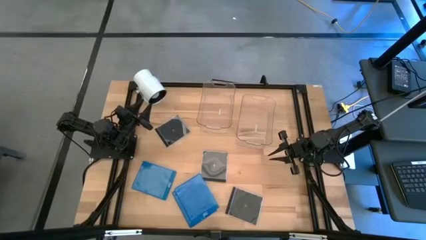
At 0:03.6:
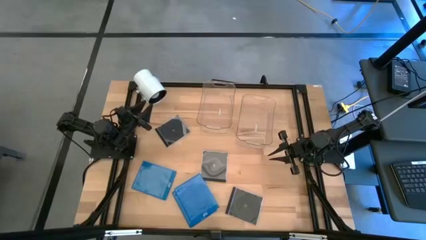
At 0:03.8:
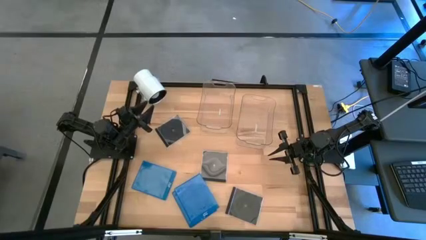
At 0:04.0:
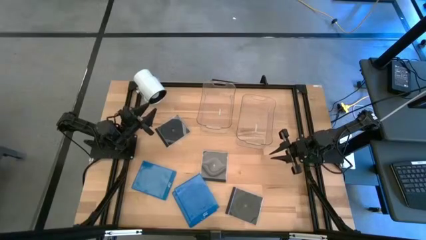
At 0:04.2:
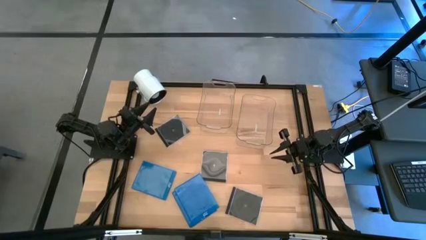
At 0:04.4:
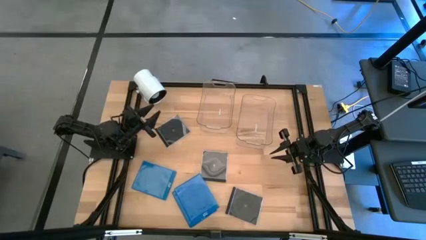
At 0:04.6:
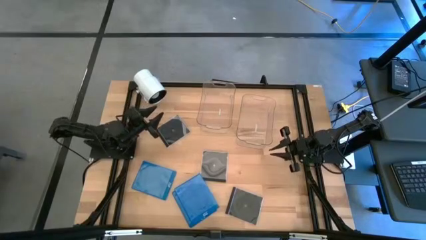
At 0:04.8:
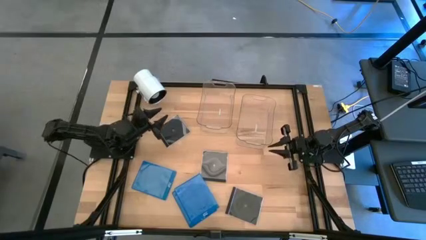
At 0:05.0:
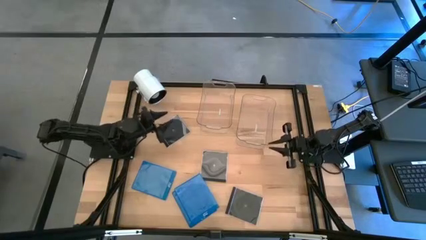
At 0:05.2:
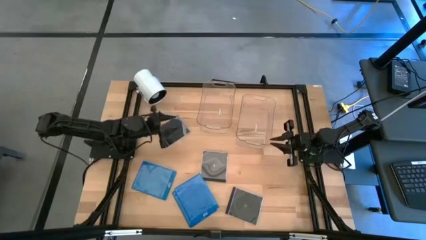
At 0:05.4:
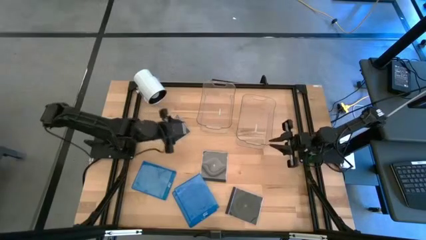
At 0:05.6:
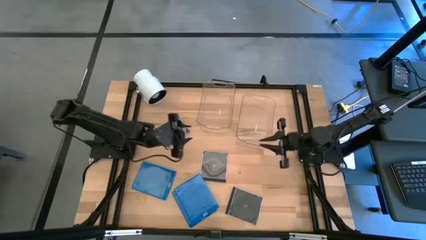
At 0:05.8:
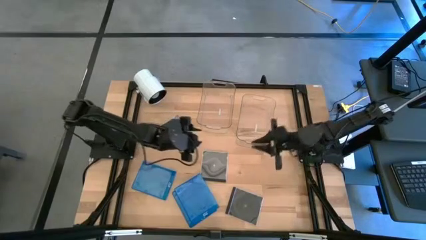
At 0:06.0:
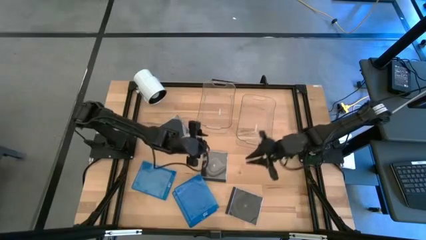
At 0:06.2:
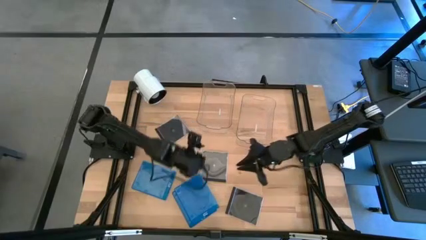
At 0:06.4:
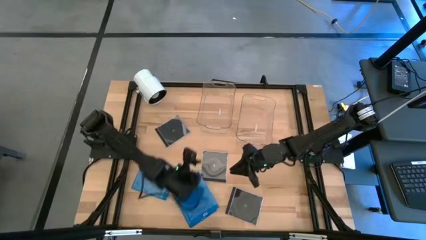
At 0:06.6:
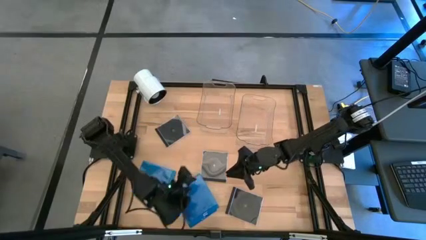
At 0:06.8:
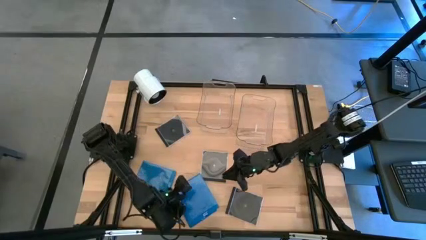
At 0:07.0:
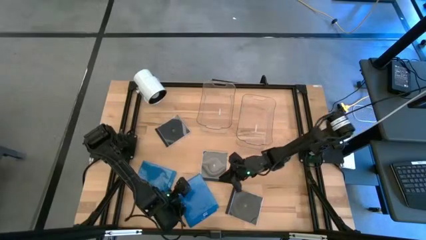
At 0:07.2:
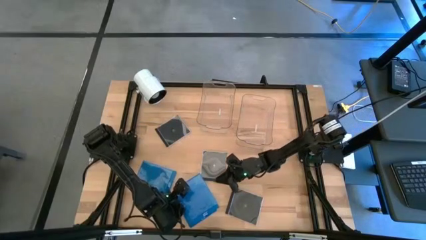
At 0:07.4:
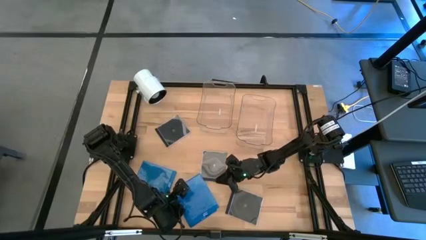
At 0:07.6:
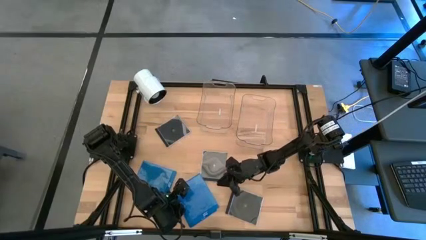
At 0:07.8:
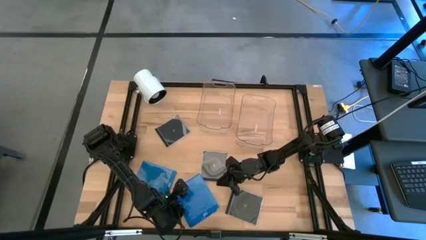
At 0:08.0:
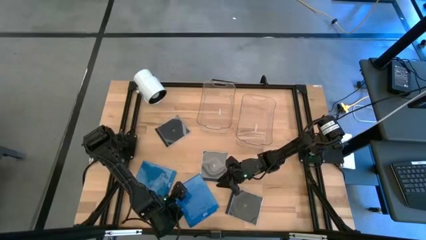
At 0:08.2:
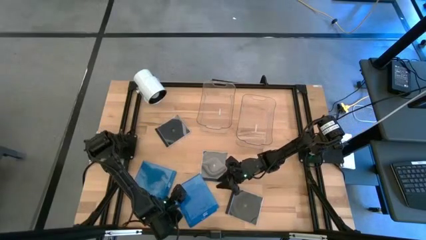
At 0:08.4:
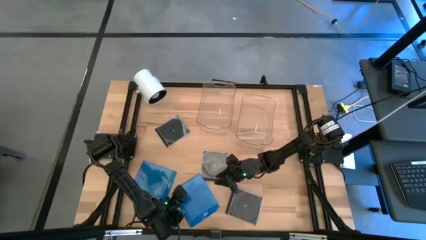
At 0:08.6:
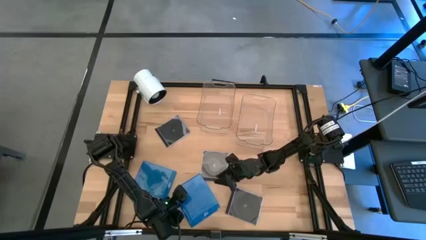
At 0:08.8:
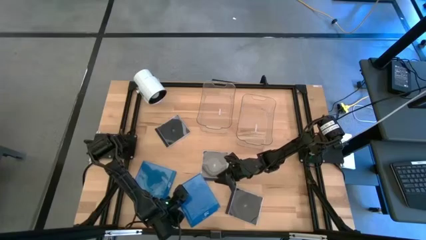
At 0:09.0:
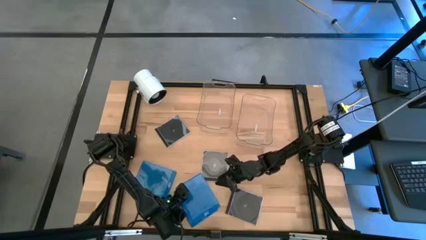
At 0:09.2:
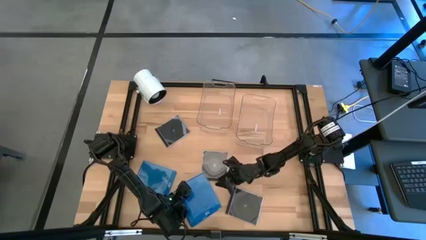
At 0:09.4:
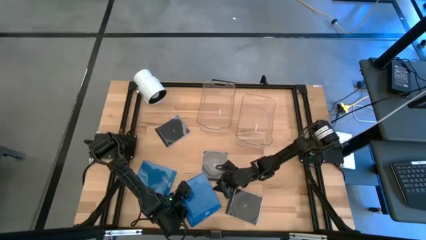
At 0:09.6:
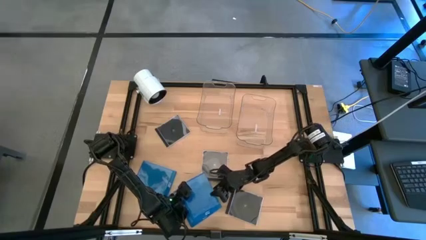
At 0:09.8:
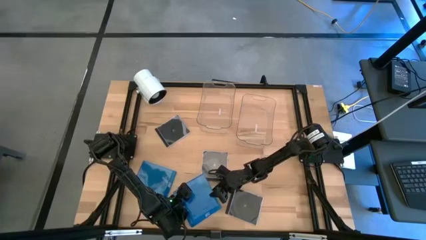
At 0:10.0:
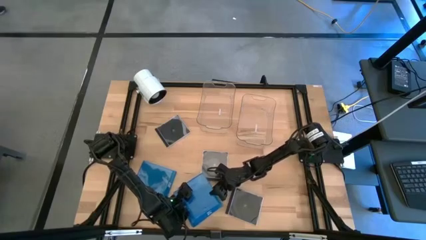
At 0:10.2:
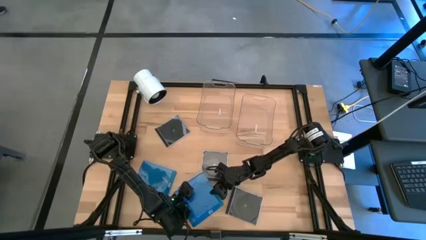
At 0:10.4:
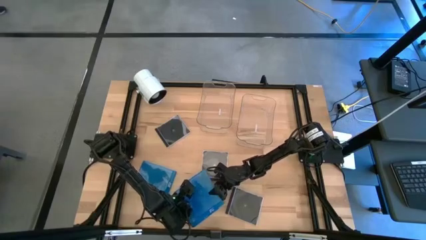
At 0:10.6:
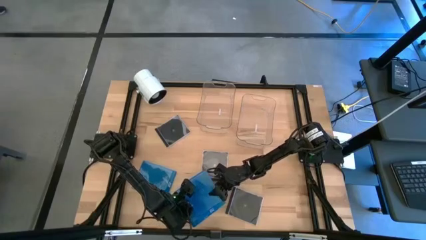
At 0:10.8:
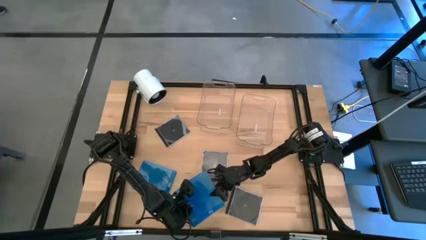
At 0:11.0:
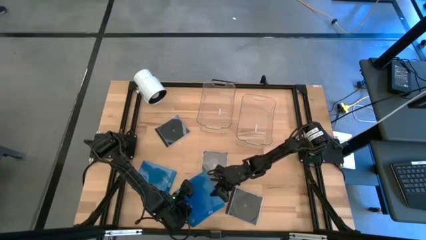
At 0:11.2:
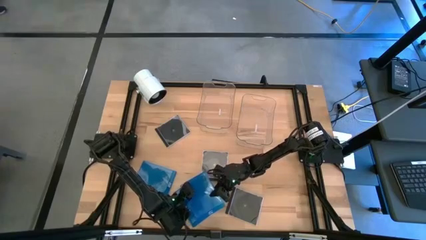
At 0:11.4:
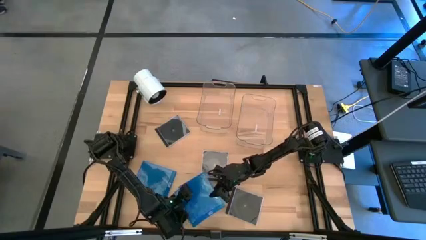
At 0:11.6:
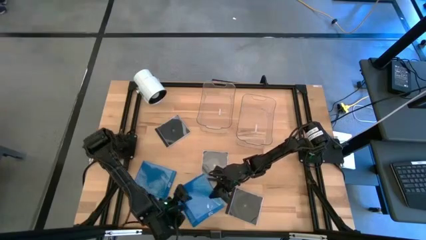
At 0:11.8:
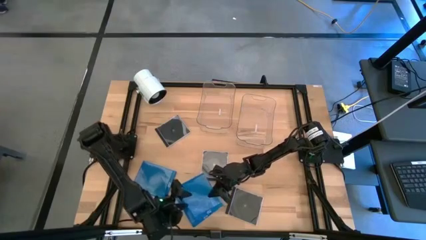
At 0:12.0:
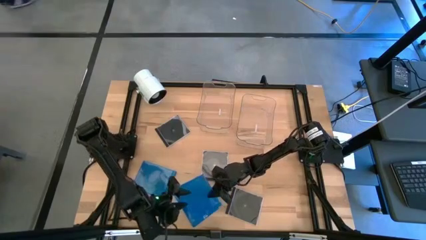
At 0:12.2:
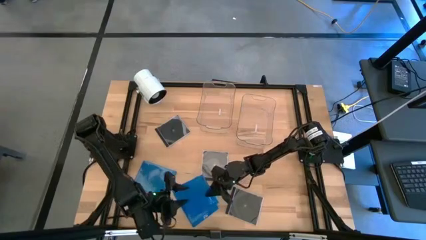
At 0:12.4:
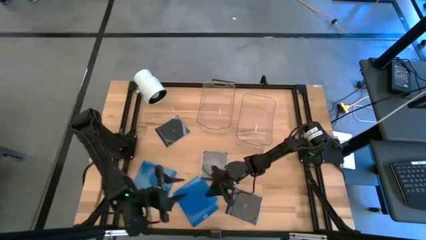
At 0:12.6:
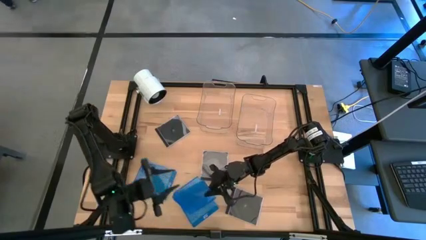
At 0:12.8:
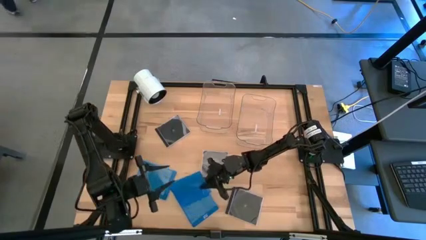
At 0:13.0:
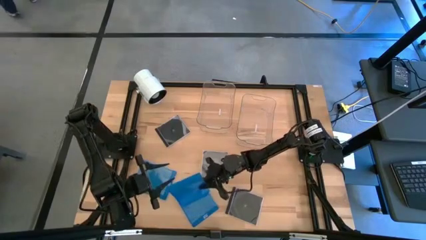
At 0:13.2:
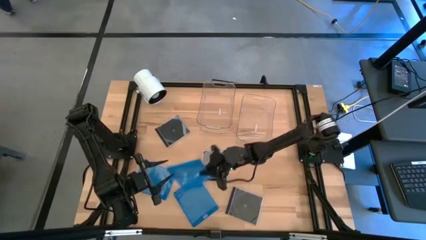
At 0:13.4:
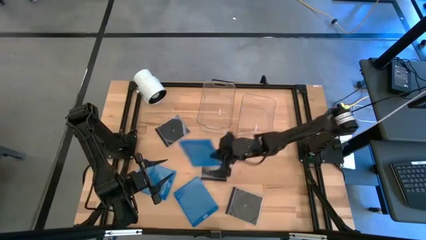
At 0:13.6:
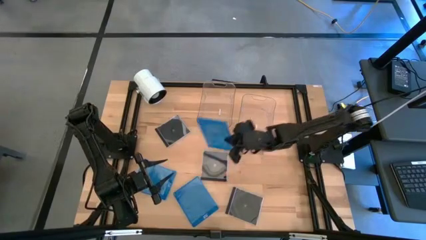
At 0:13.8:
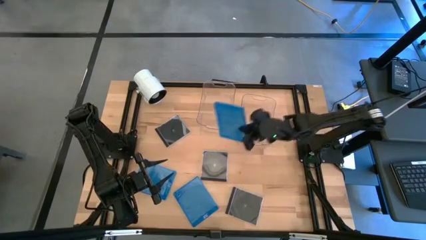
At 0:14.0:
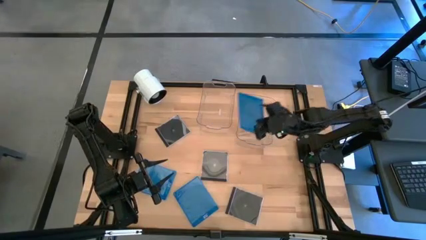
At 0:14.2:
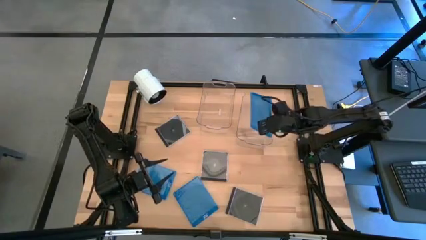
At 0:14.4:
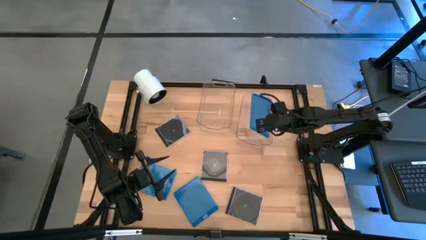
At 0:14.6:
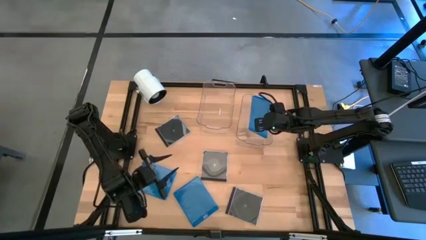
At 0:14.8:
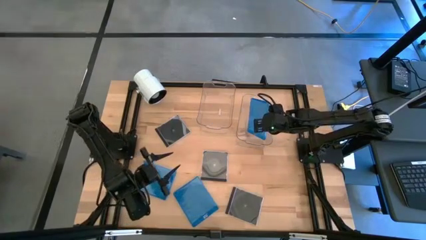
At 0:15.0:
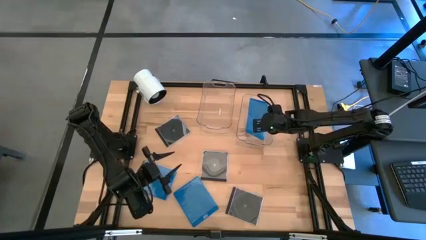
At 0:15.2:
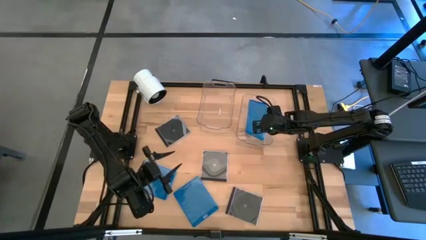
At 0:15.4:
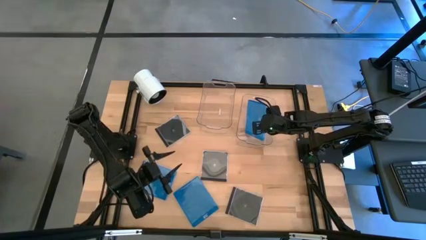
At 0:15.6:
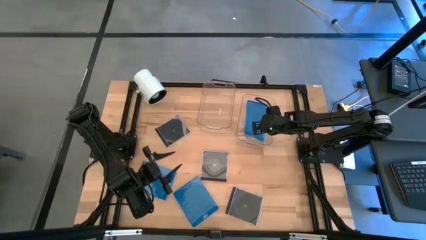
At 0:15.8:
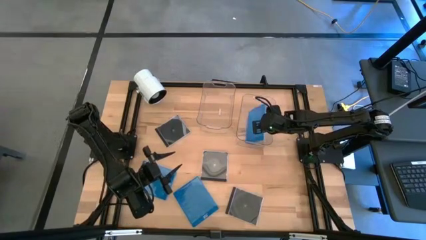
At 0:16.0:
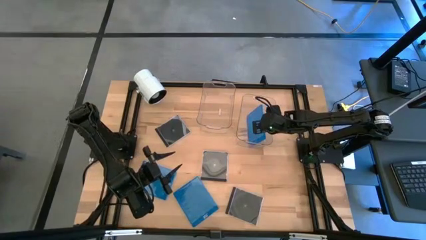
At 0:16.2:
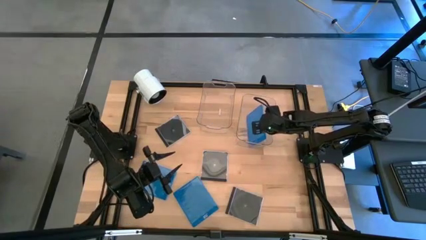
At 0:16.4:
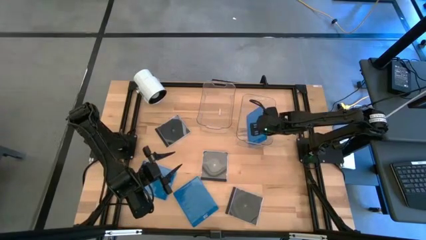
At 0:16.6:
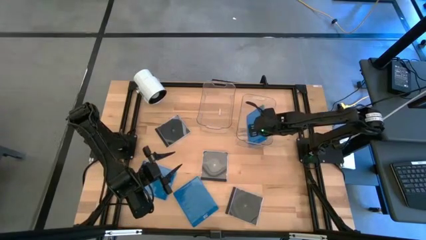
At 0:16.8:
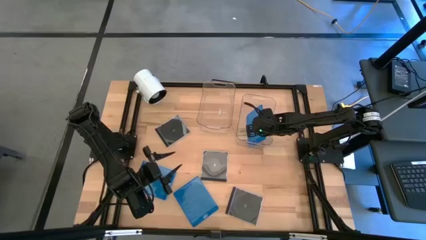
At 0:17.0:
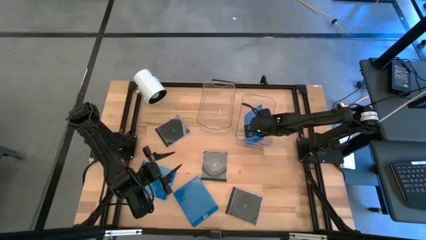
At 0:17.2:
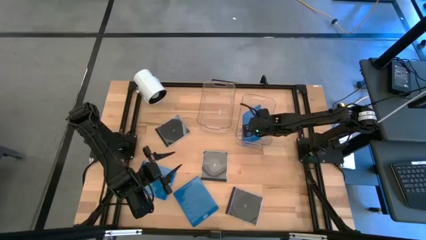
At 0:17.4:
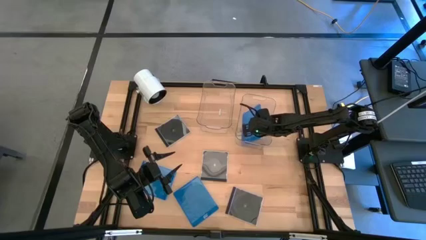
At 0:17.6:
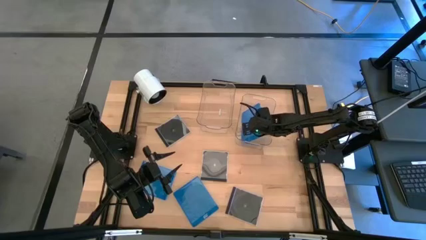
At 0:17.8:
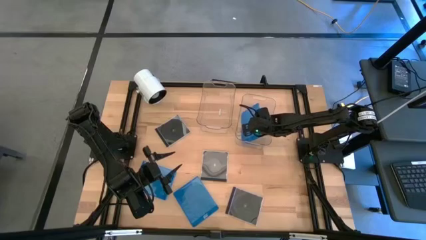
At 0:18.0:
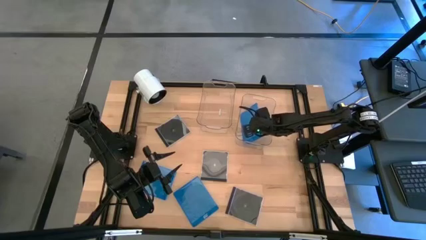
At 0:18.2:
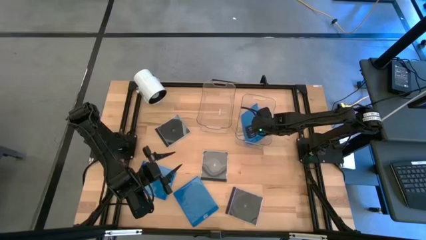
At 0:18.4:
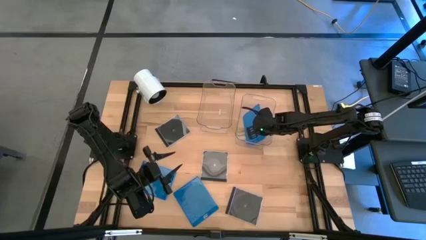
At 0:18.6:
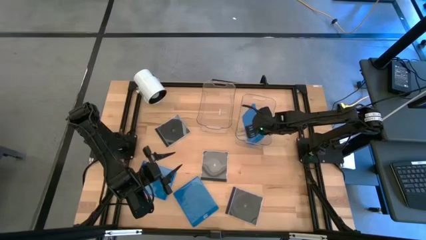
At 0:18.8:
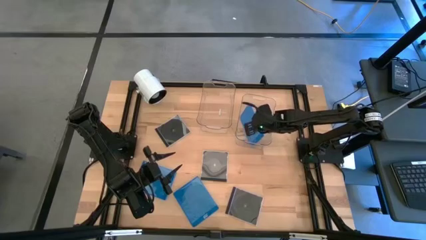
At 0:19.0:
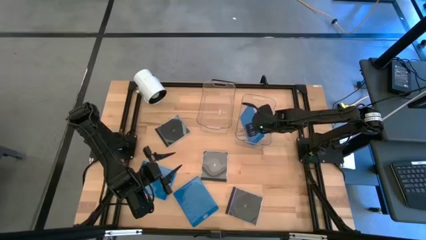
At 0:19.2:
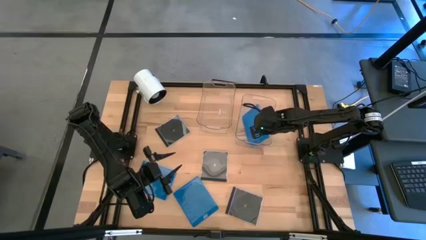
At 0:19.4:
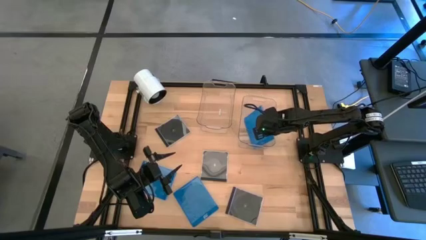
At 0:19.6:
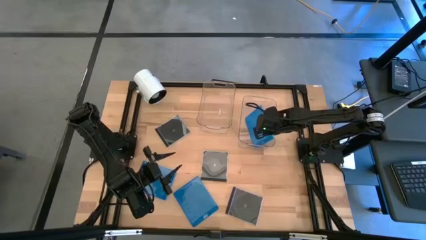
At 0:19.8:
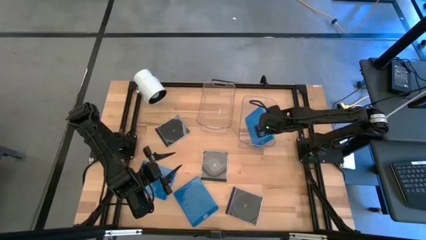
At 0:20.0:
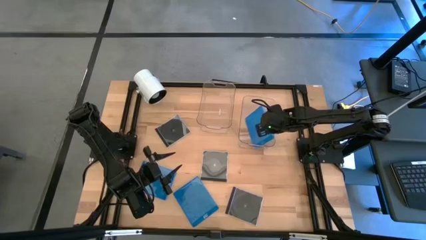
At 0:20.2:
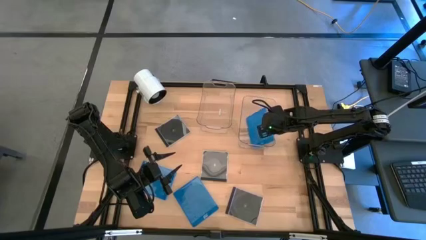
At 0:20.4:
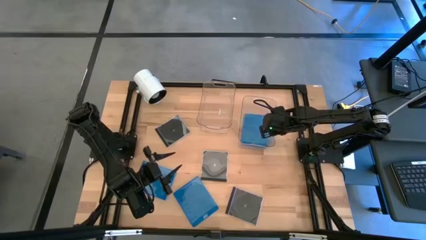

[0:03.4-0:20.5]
Task: Pick & place jewel cases by type
Put the top blue cd case into the right transparent bin
